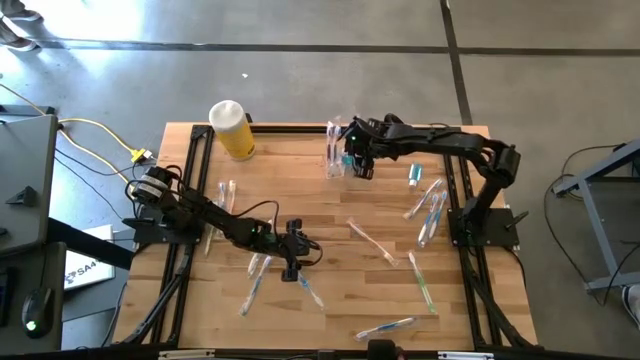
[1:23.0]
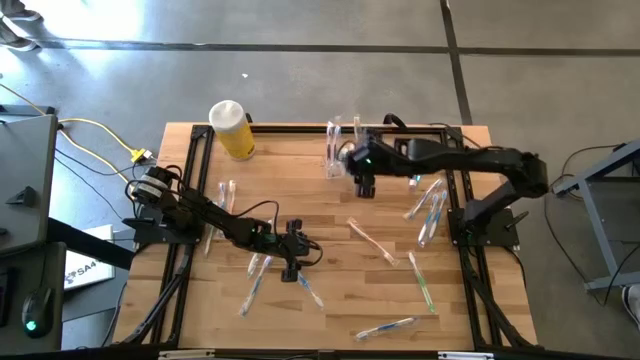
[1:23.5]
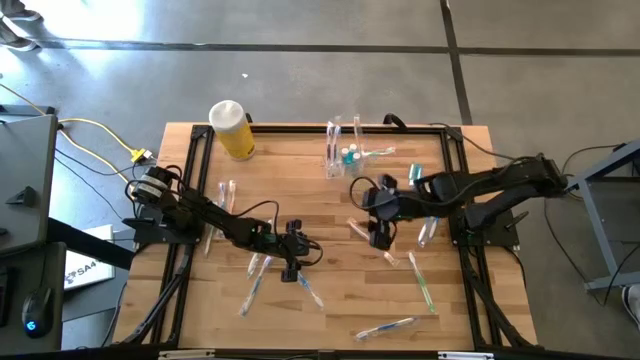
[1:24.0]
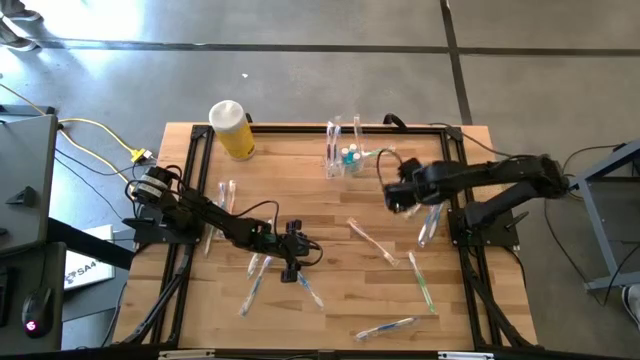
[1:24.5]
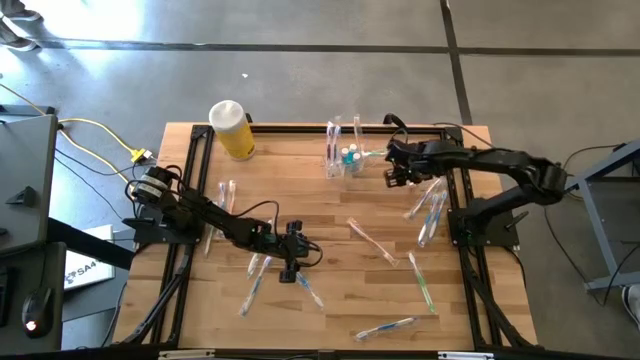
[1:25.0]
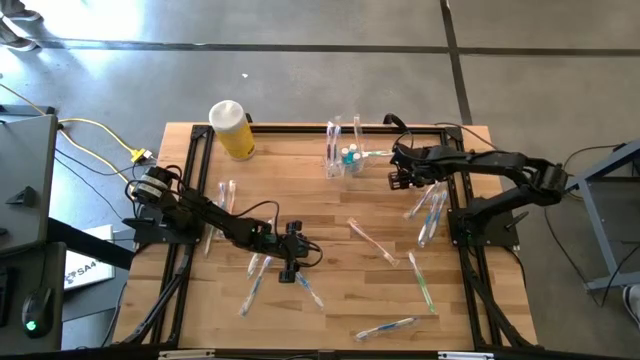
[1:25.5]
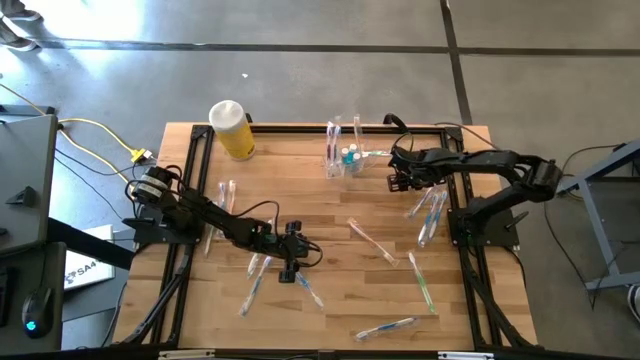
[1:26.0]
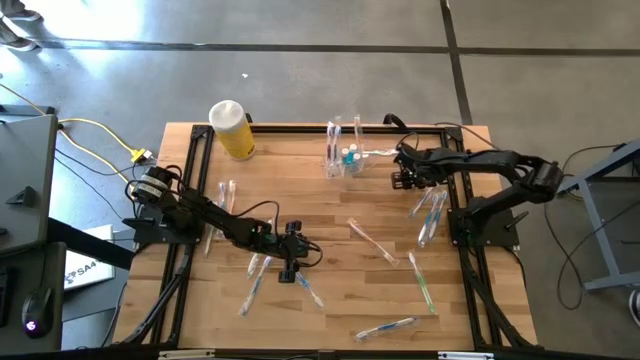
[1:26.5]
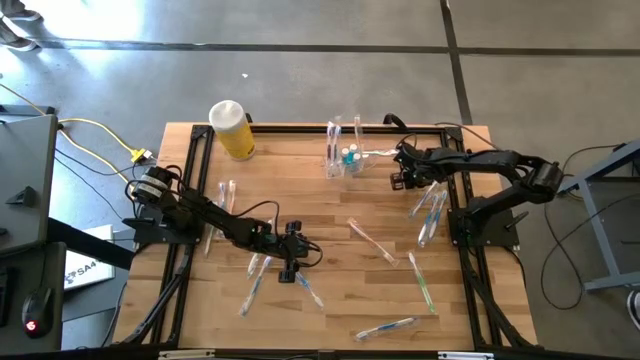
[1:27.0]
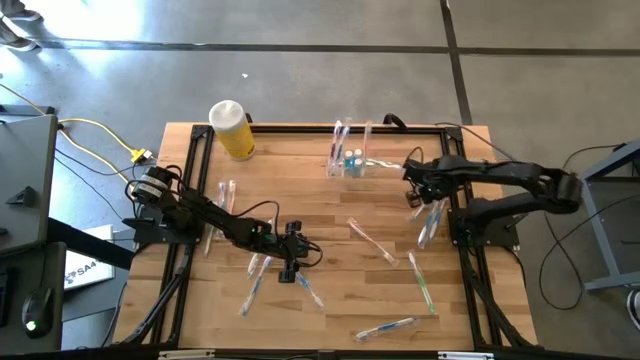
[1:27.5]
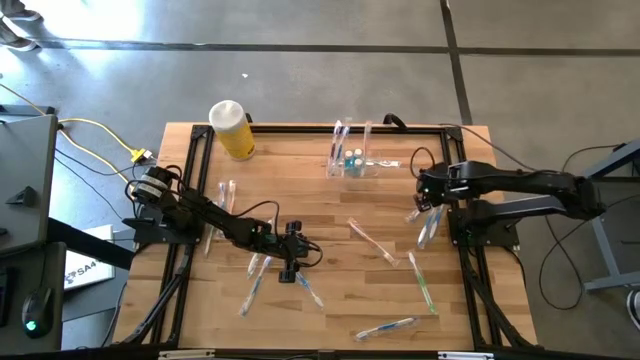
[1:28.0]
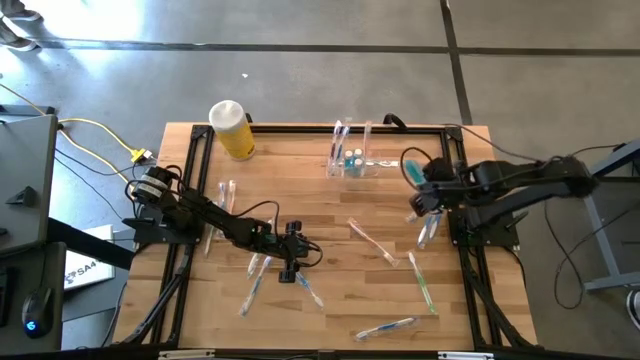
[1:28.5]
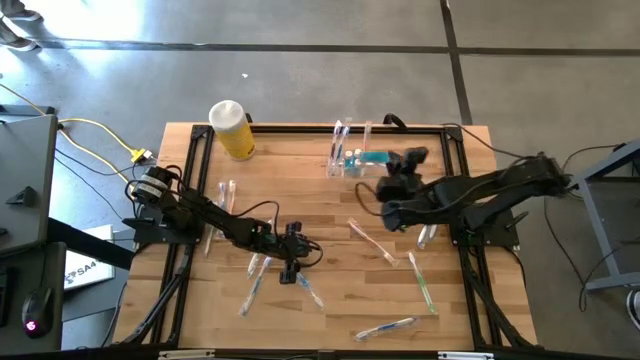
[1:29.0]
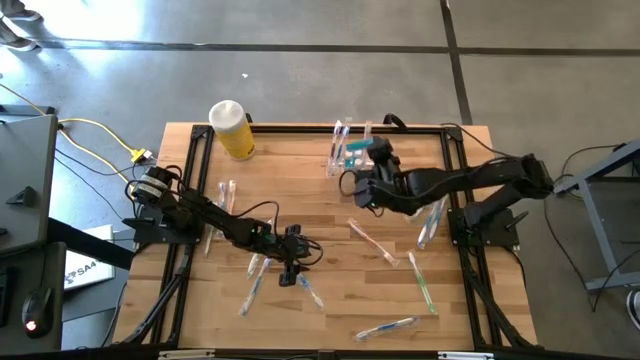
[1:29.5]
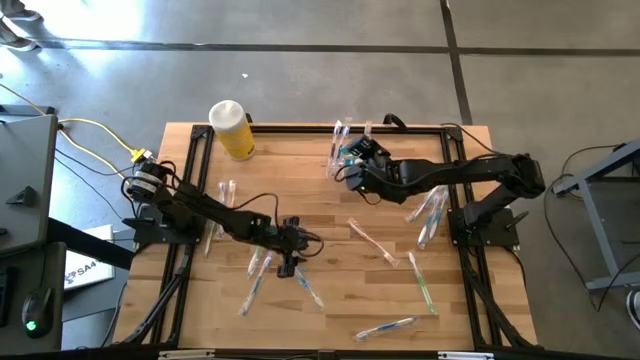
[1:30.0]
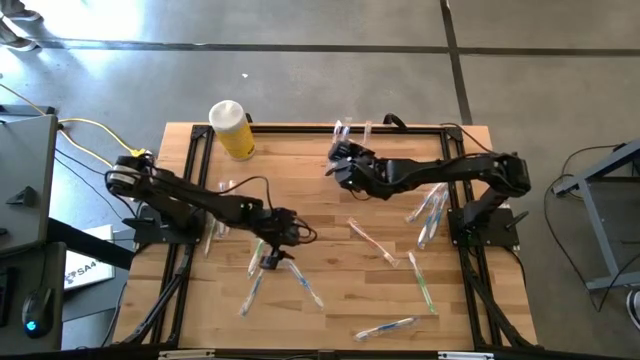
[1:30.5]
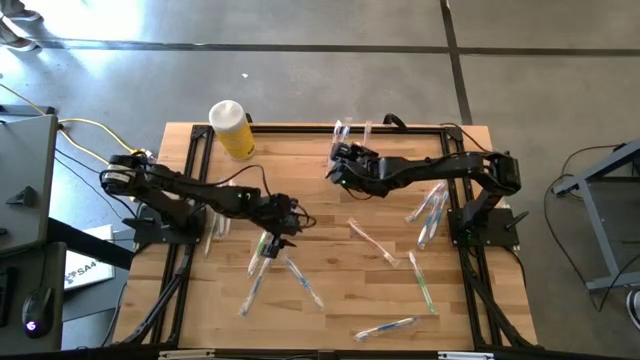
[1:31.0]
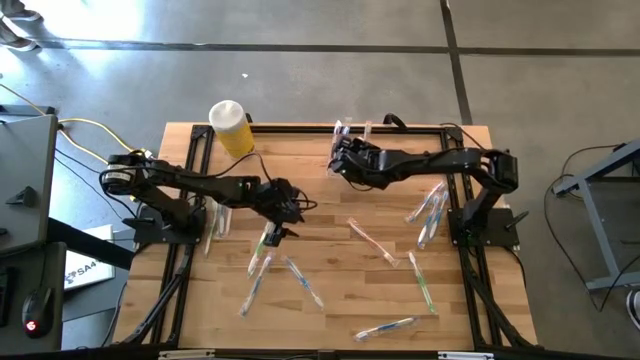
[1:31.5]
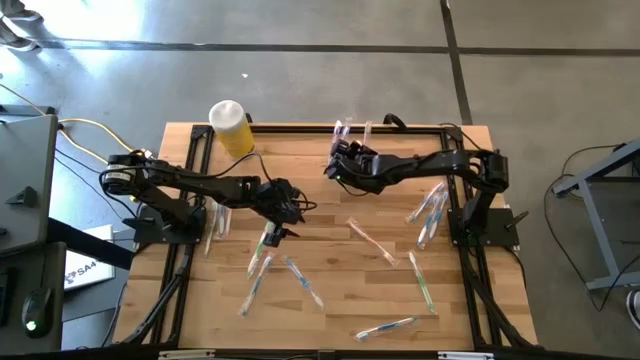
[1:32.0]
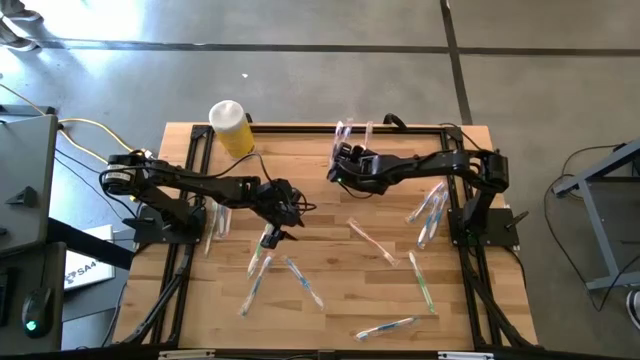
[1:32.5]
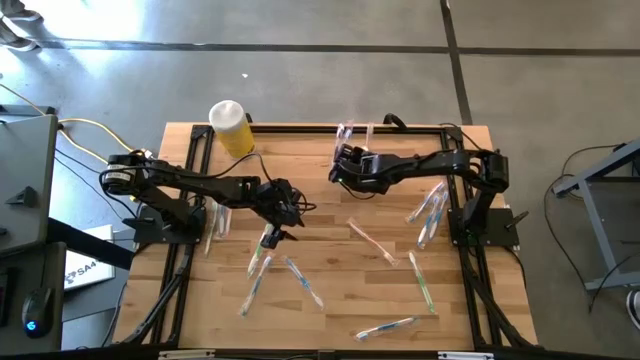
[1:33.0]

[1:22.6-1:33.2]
Task: Pick & Place toothbrushing station
Put the blue mouthwash bottle into the transparent organizer

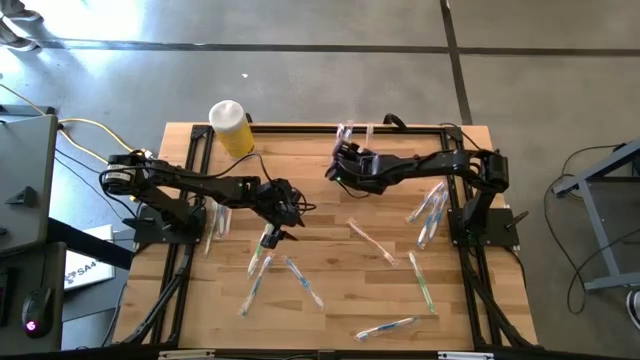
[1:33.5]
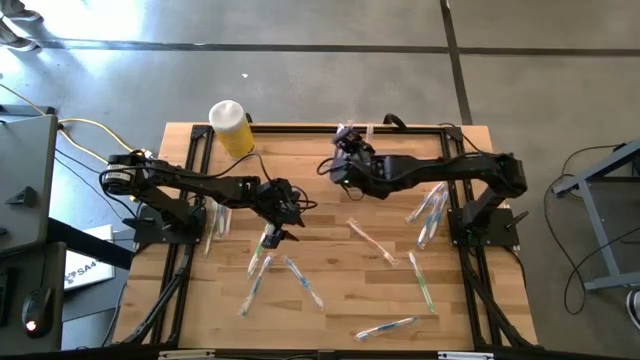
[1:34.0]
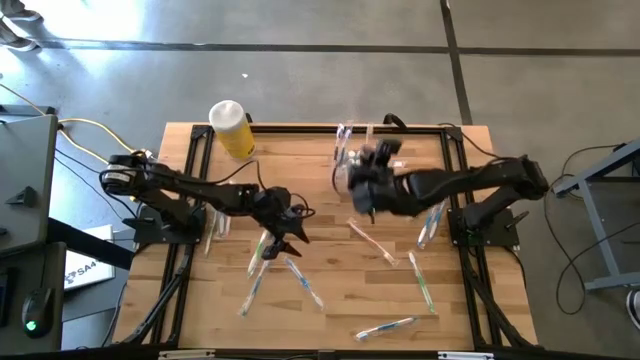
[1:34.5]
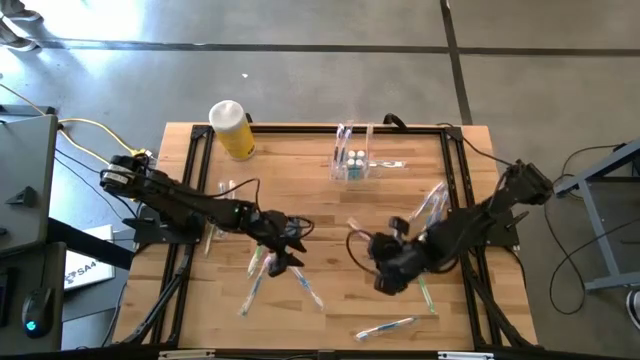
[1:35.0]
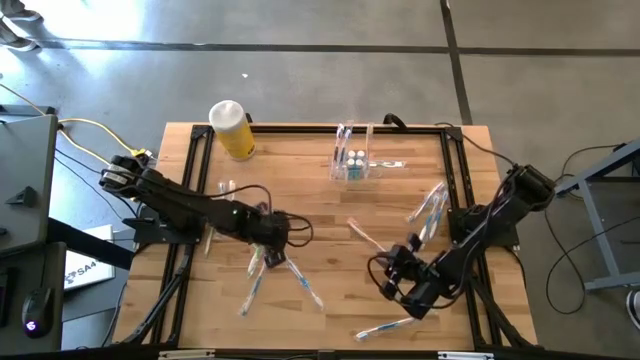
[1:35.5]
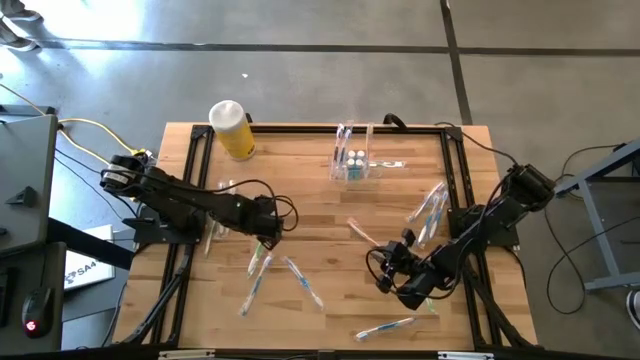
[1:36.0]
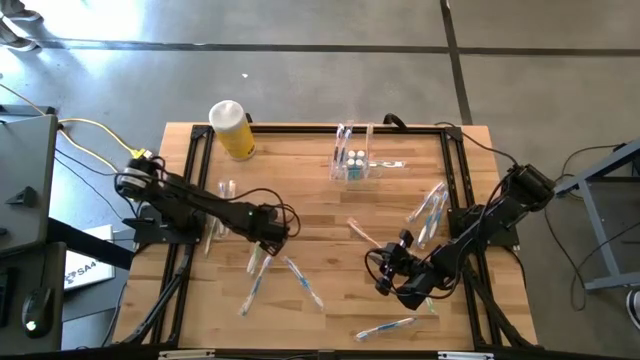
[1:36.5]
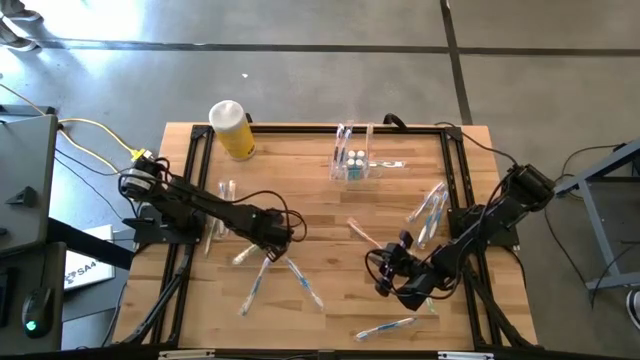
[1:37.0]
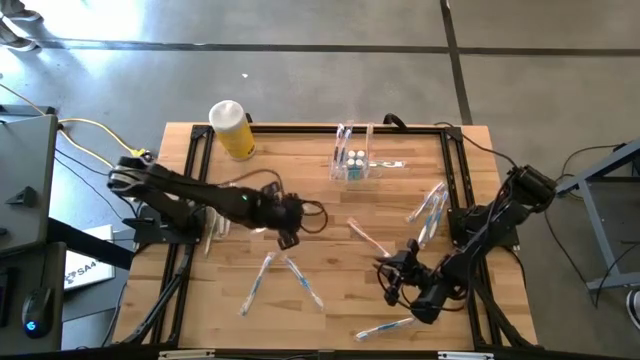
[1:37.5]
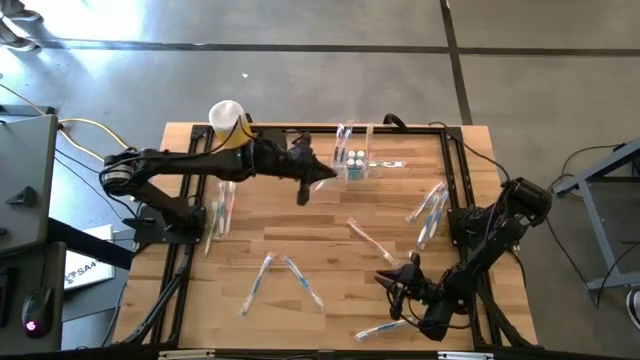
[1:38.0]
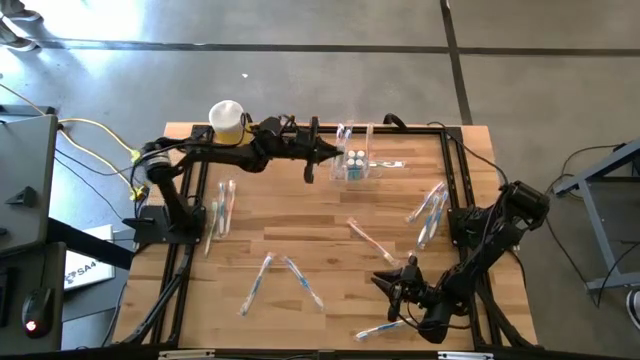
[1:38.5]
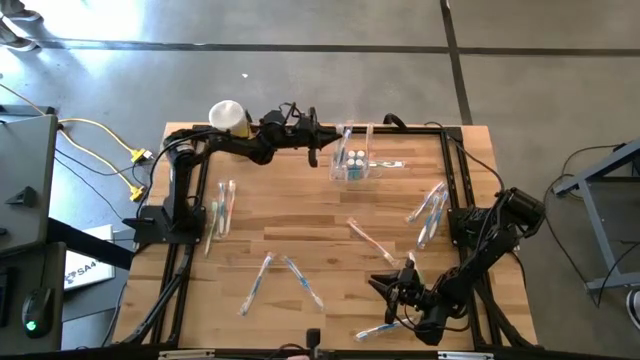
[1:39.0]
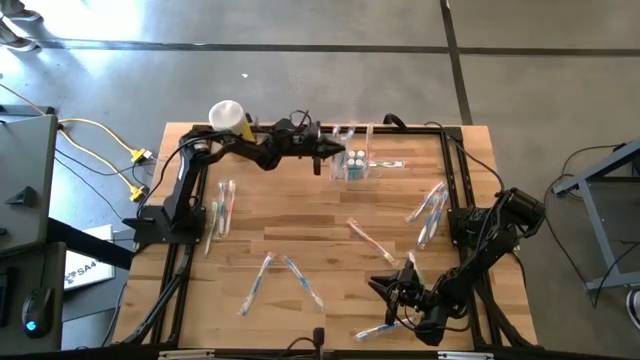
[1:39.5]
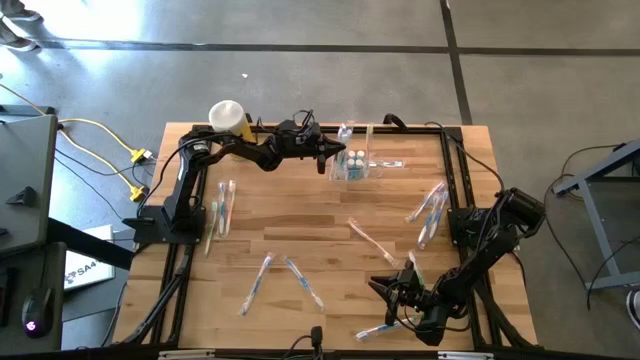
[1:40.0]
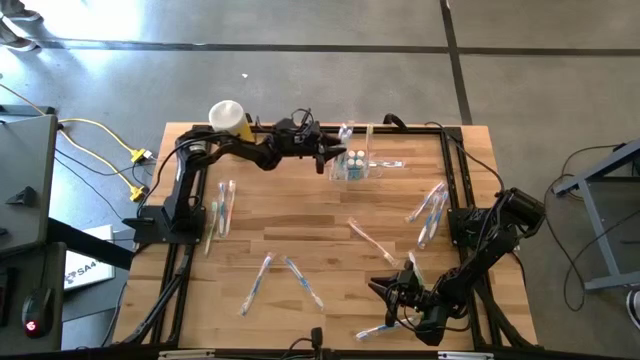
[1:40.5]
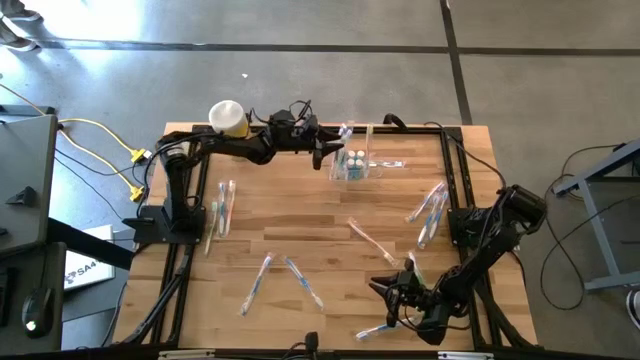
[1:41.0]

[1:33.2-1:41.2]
Put the green toothbrush into the transparent organizer

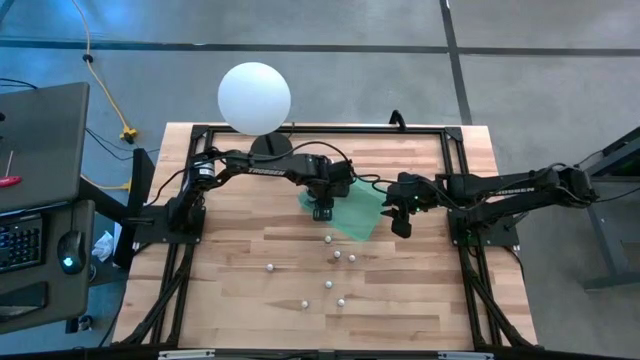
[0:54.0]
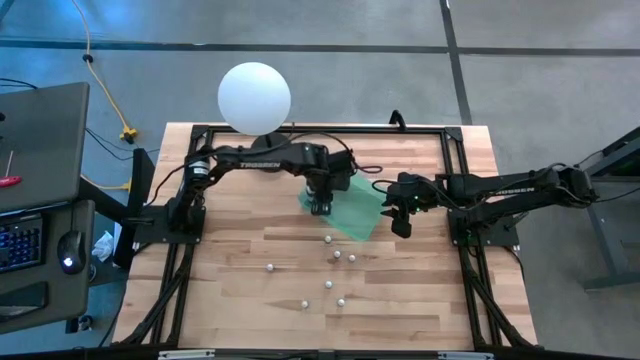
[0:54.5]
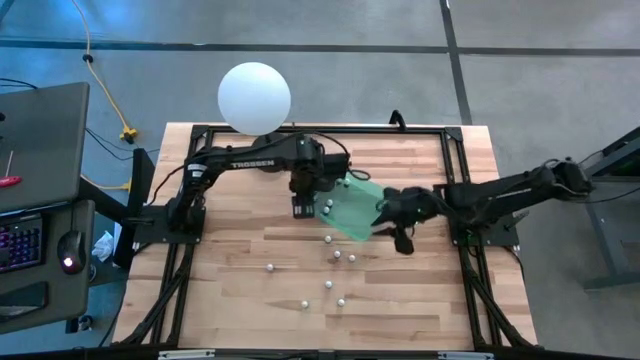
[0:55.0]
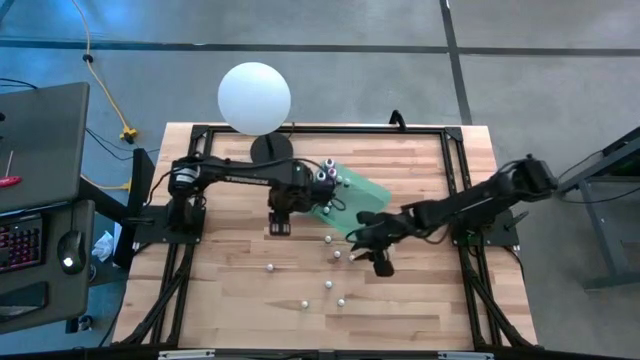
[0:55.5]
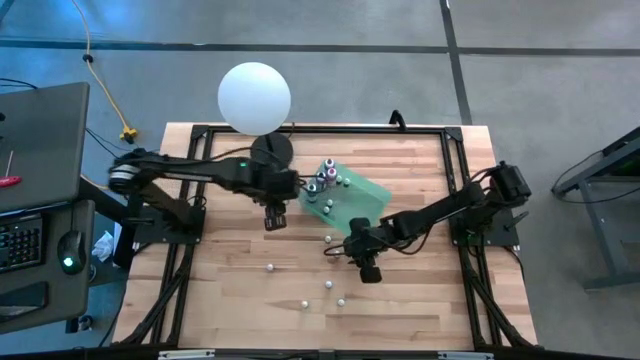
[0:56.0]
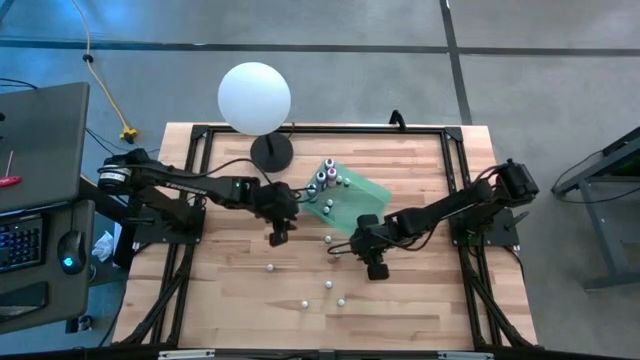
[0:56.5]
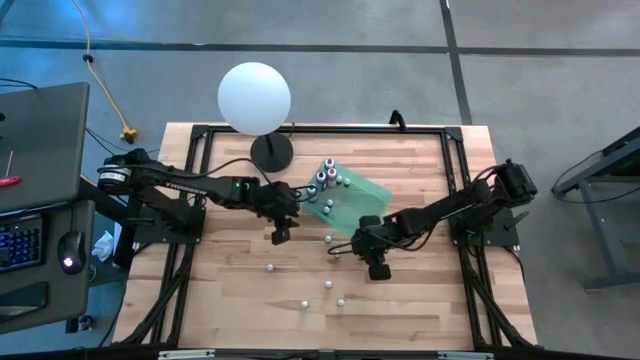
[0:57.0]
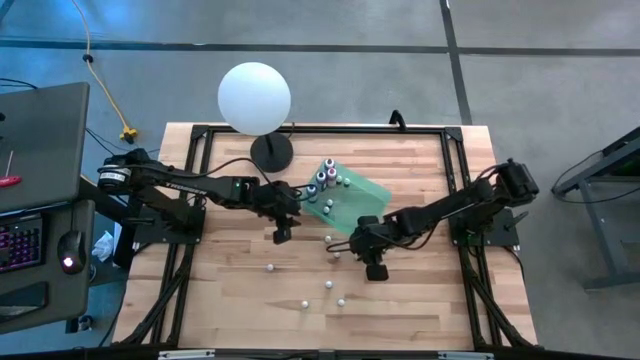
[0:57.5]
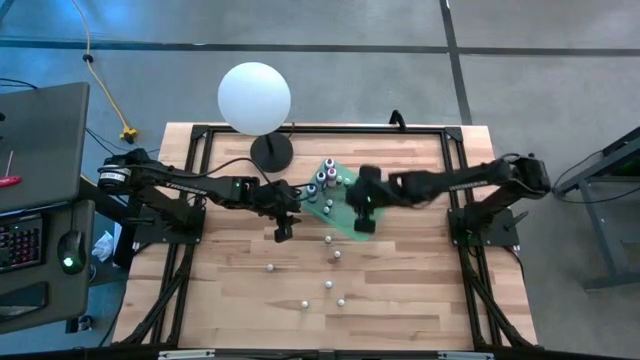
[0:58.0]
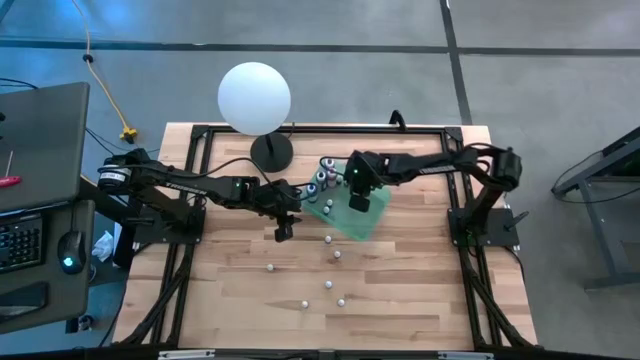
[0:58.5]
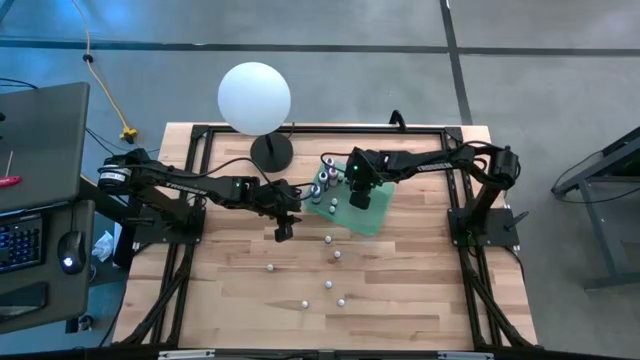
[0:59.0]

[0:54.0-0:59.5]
Task: Pick & Place food coloring
Put the small red food coloring bottle into the green container
